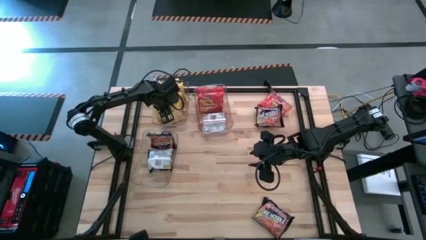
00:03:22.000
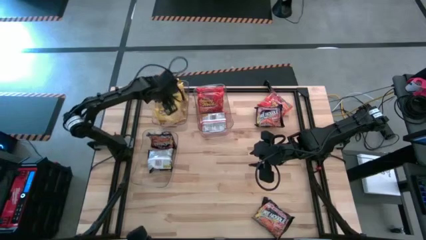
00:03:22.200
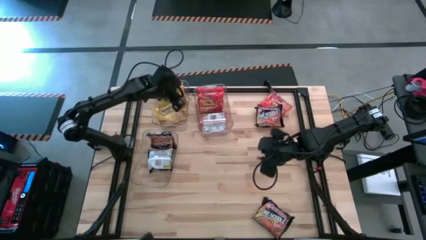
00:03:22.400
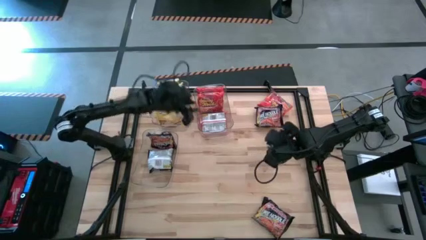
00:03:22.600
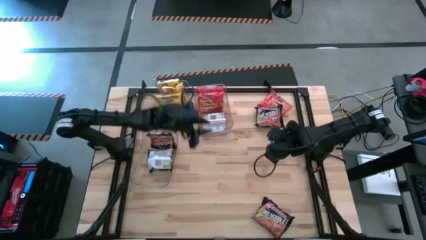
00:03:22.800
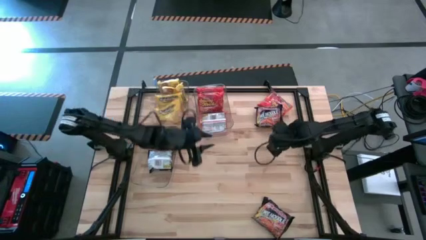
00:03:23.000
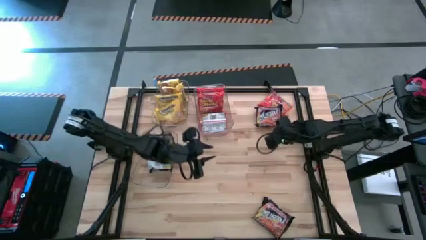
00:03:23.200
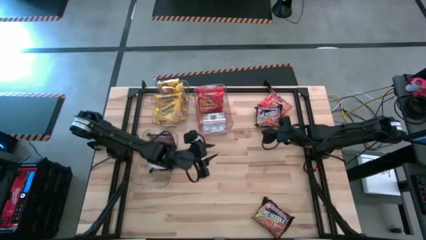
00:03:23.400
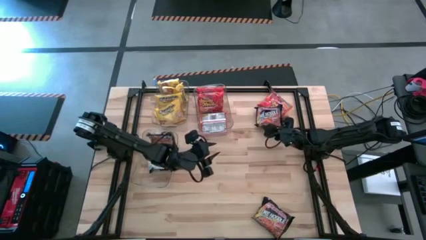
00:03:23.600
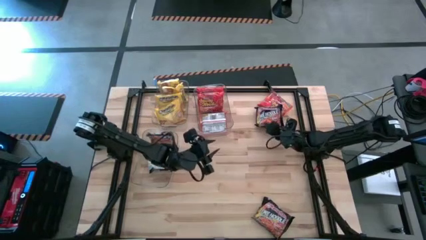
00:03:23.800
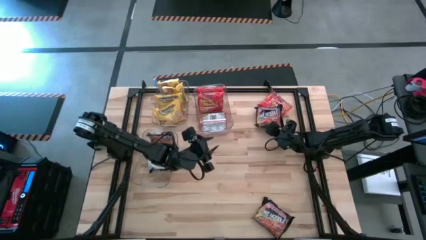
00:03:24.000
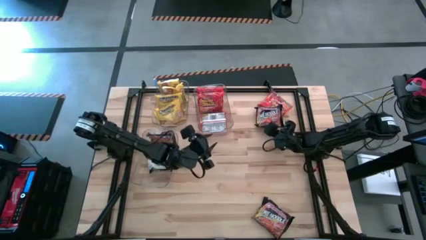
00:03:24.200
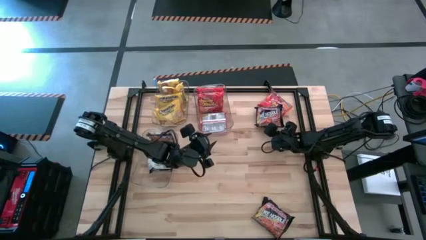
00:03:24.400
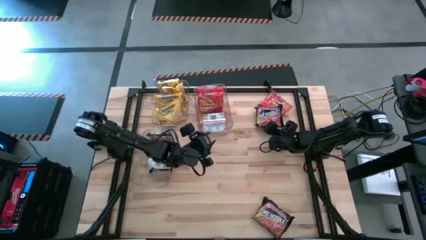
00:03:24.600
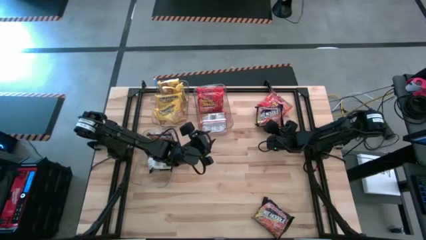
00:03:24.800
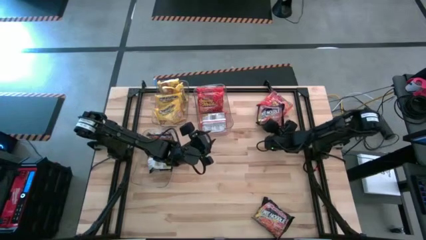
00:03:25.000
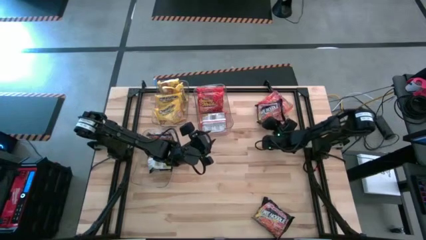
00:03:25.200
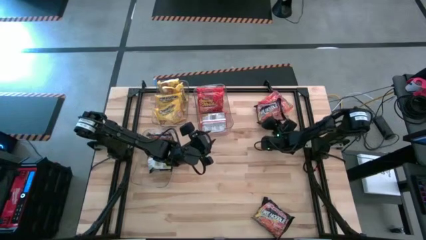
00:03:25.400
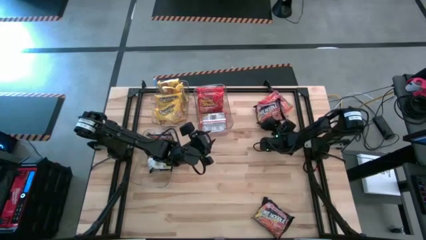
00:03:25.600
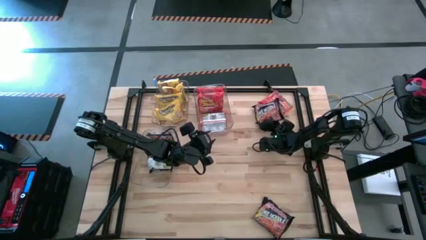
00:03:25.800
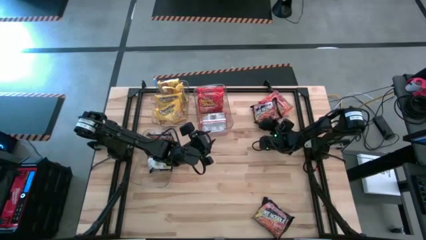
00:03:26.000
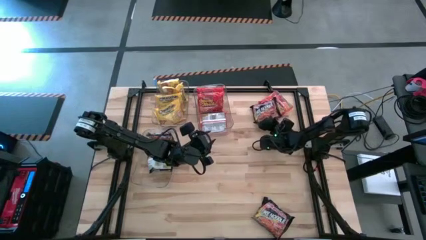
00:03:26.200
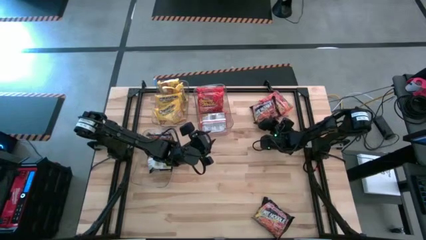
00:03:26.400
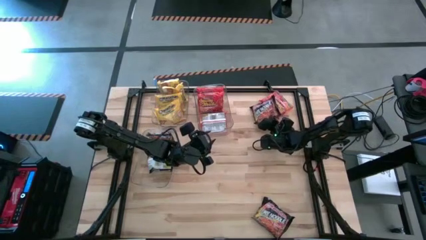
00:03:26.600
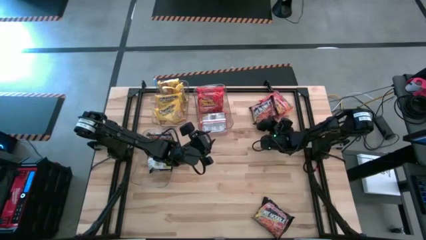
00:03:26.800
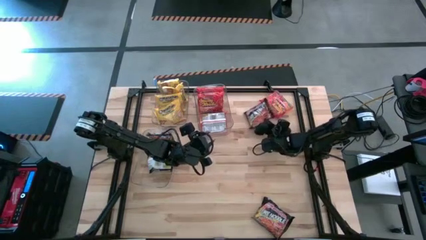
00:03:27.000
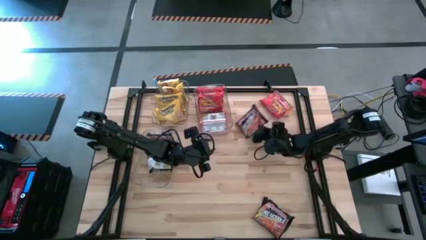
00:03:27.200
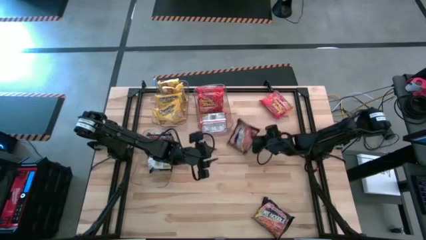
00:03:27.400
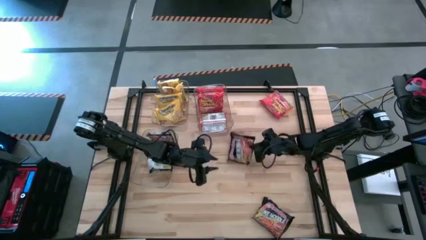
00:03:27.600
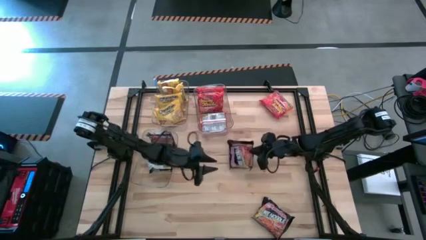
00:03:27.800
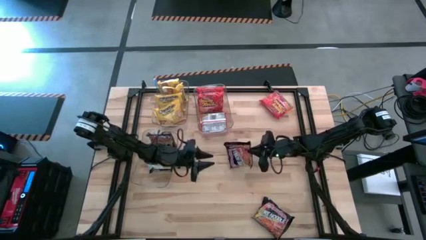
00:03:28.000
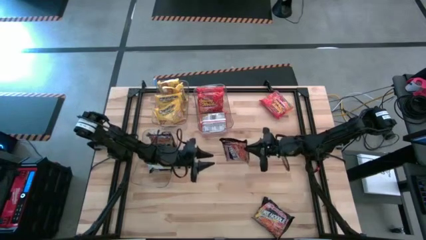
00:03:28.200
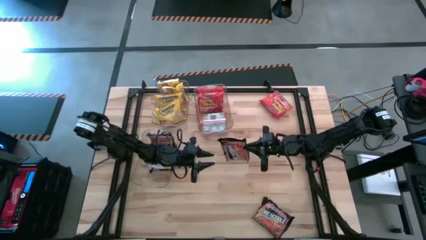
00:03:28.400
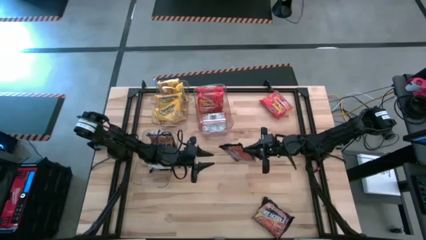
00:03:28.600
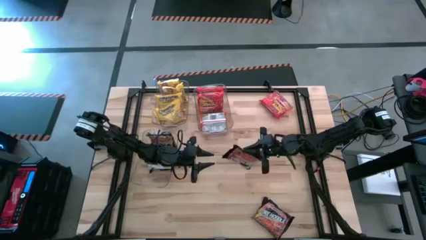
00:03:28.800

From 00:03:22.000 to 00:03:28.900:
Task: Sort Maruchan noodles
Put the black noodle pack into the bottom transparent bin

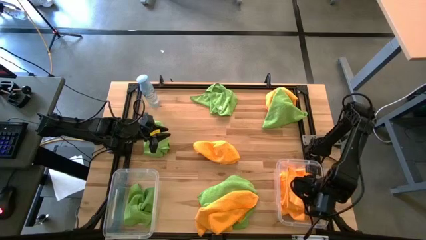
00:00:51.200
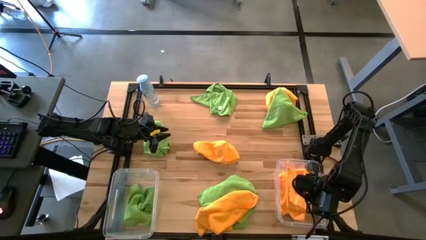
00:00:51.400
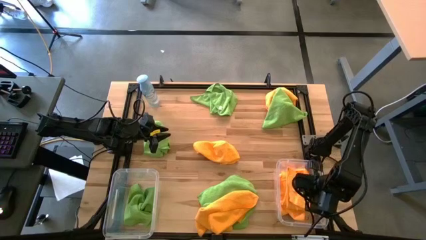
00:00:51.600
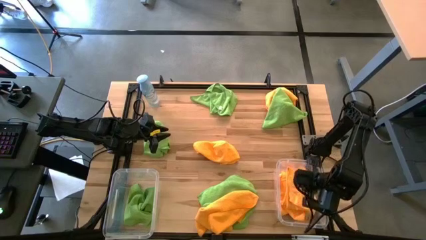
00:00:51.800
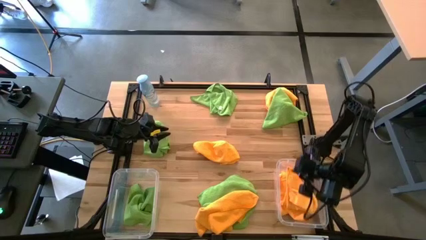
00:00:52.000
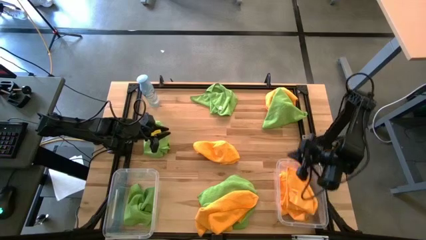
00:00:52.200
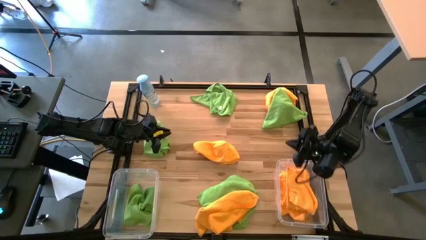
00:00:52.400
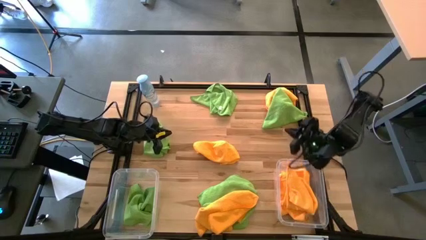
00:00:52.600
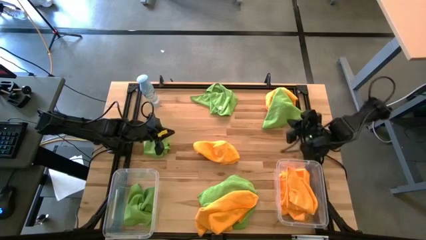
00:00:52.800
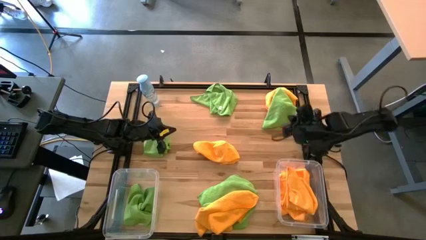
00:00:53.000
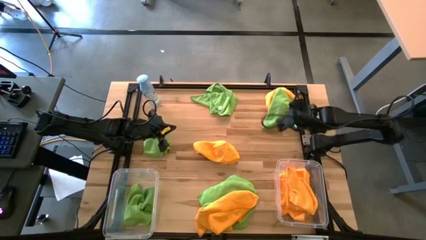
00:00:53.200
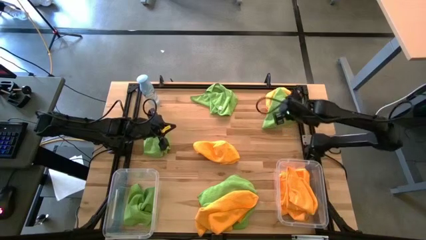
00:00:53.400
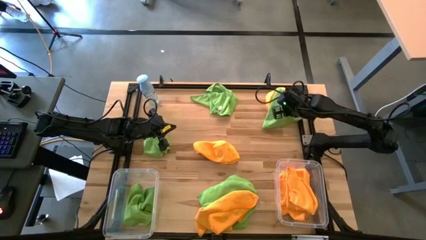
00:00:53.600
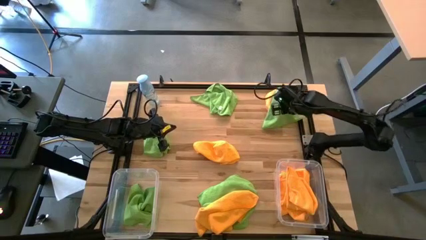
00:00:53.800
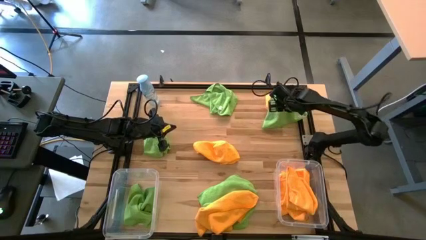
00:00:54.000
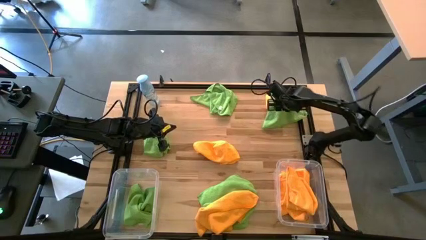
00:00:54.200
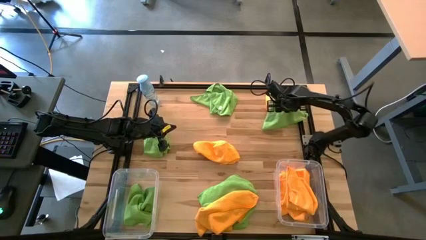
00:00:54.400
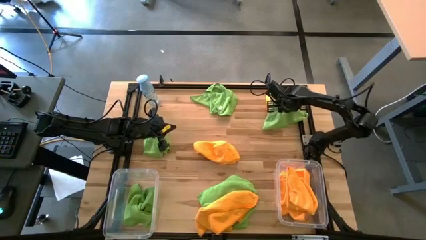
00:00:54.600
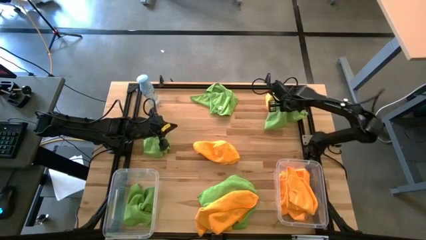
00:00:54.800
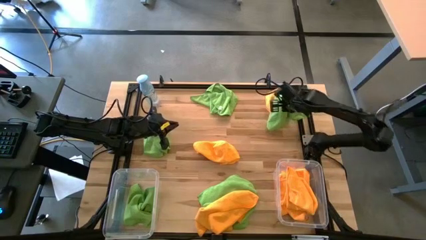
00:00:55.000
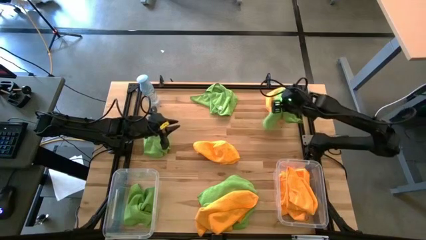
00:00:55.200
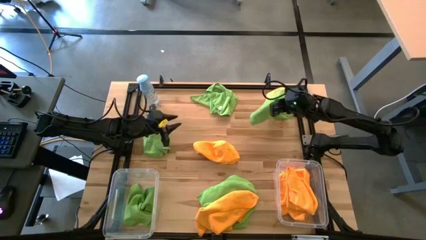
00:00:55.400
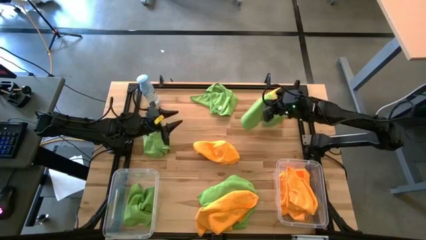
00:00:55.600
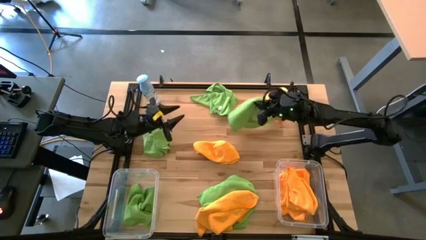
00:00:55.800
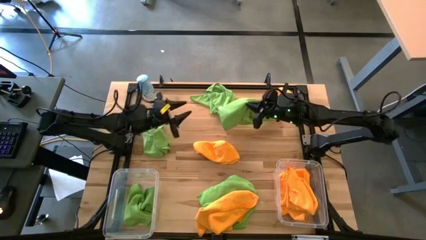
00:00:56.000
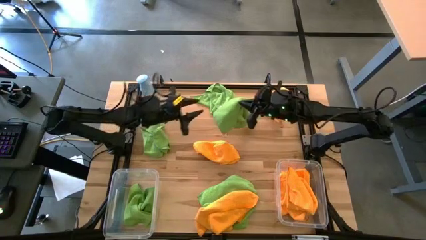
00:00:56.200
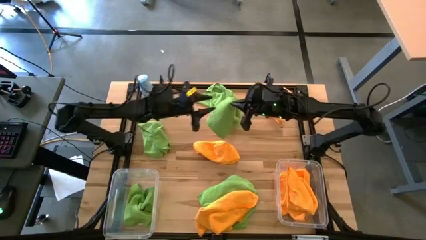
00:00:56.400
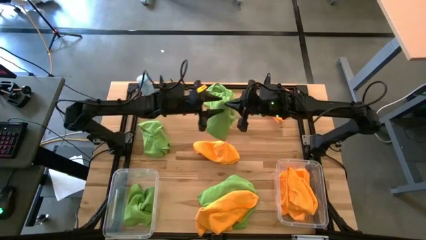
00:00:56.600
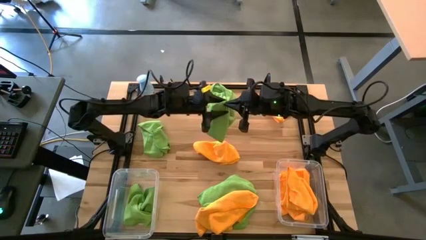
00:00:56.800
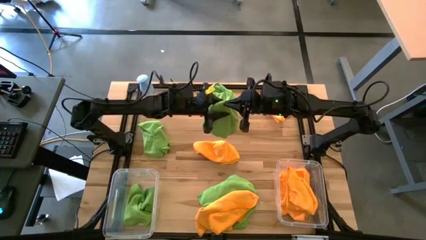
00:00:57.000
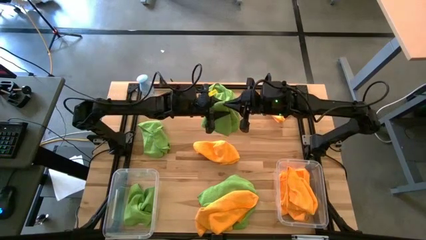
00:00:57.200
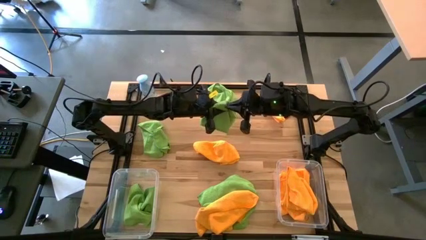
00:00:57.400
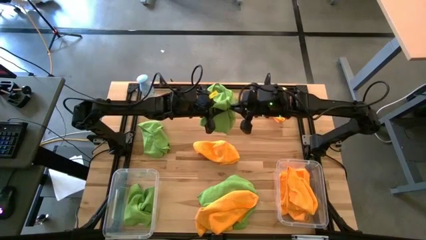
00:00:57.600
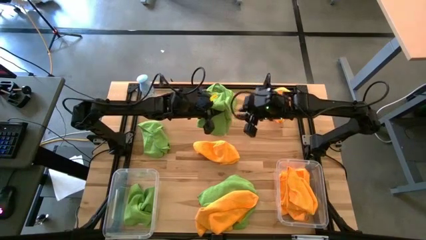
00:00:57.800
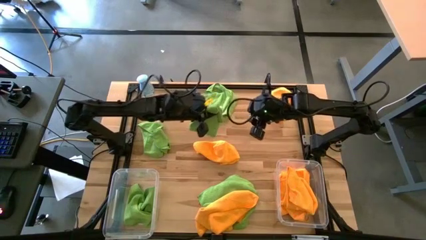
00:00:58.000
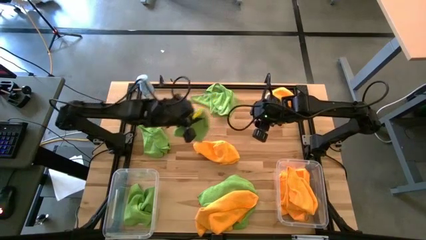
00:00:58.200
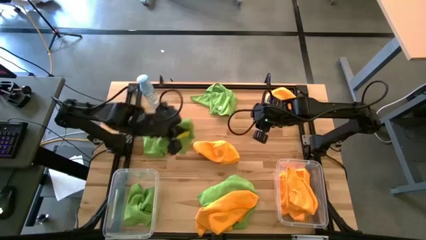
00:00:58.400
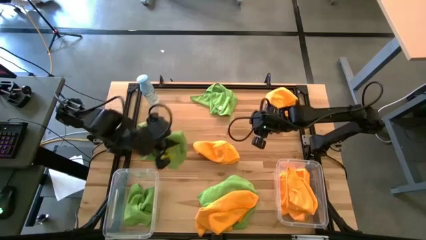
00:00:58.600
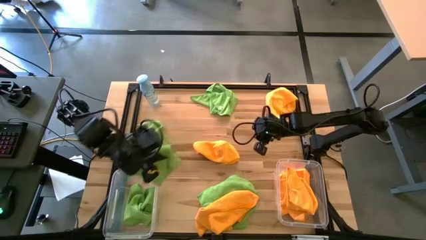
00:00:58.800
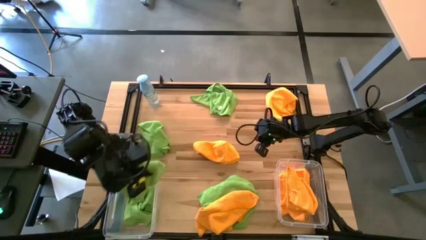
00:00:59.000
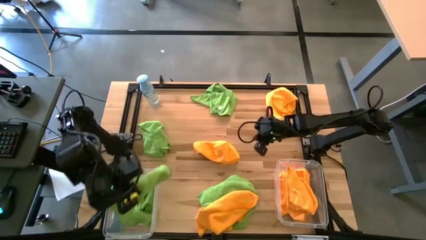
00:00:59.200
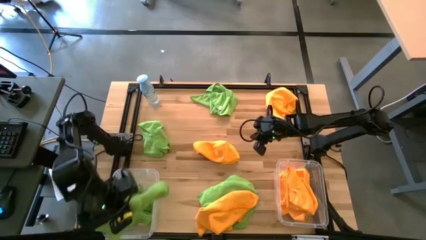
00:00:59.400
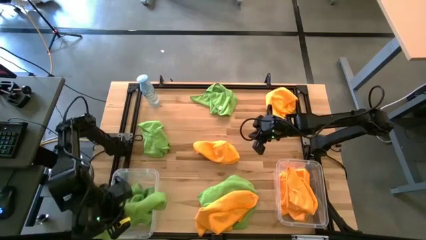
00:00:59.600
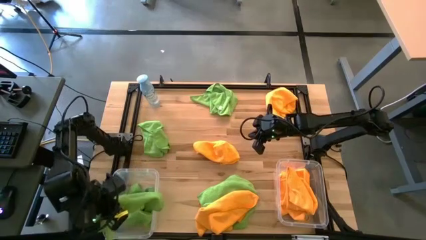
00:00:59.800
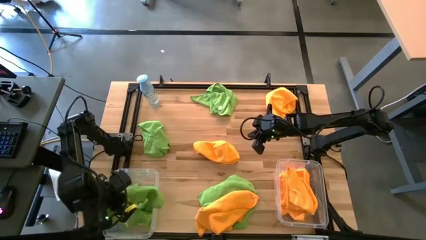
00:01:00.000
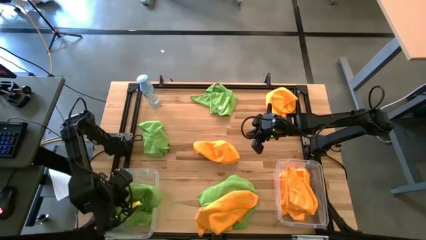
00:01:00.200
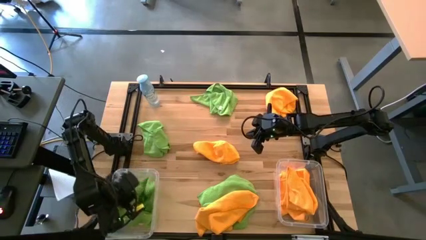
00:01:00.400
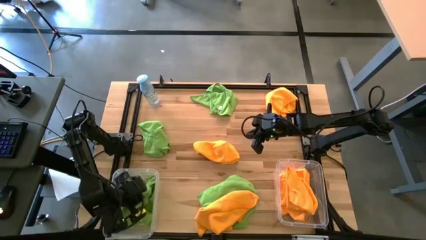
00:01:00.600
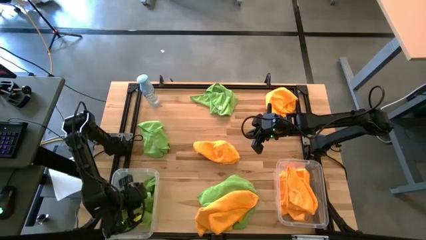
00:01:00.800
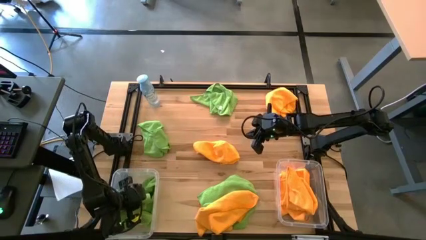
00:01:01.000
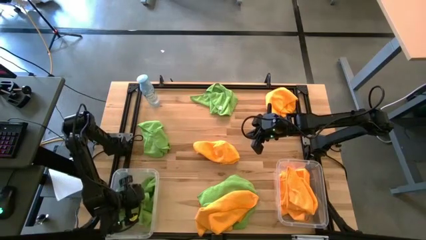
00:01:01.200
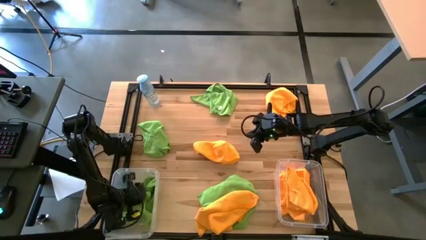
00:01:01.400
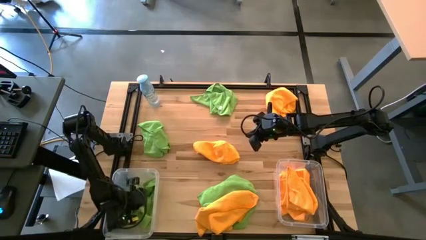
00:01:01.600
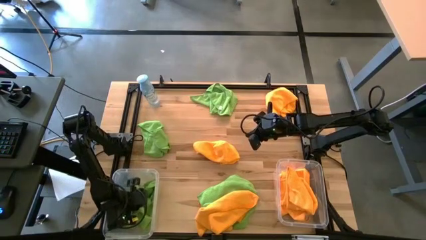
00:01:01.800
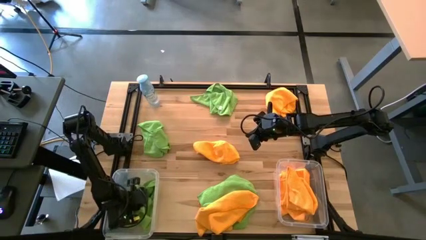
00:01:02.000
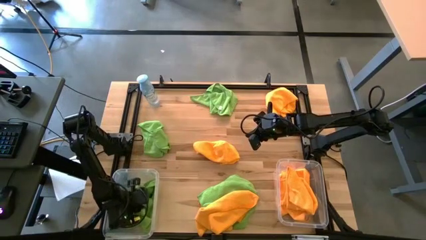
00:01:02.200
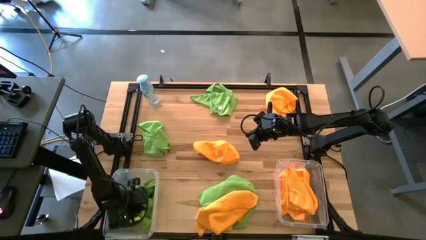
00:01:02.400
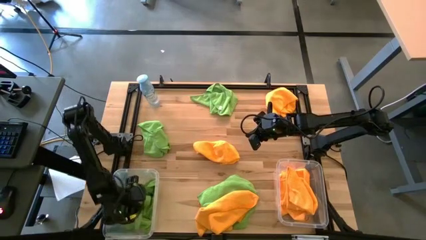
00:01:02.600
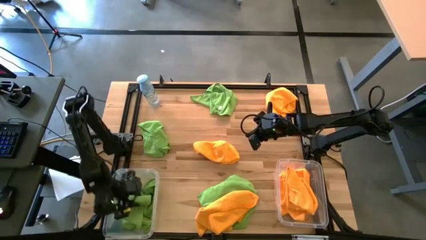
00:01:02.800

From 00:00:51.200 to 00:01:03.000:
Task: Sort microfiber towel by color & place in baskets
Put the green towel into the left transparent bin
